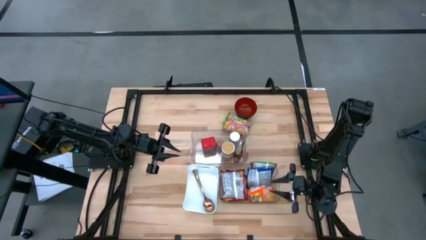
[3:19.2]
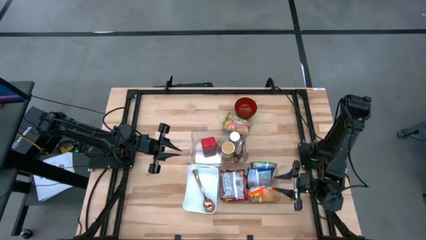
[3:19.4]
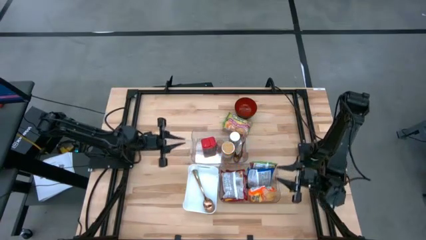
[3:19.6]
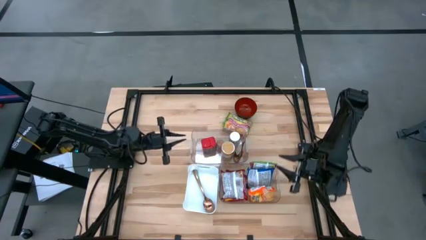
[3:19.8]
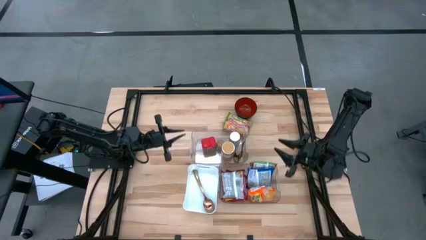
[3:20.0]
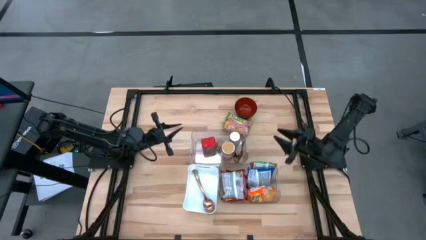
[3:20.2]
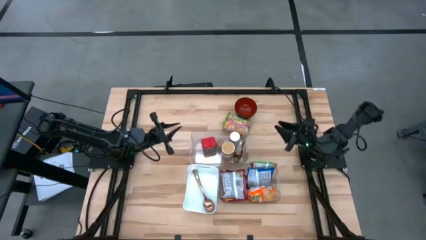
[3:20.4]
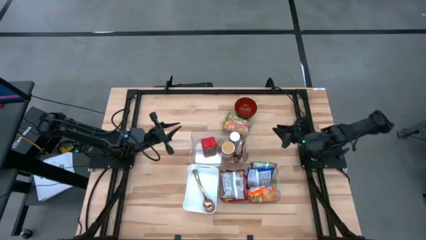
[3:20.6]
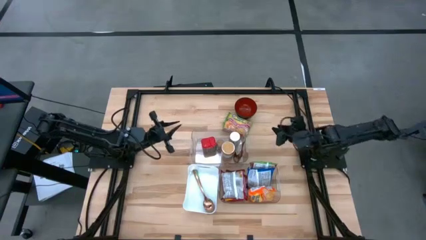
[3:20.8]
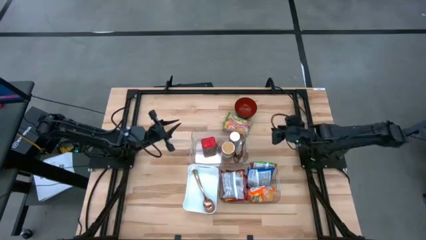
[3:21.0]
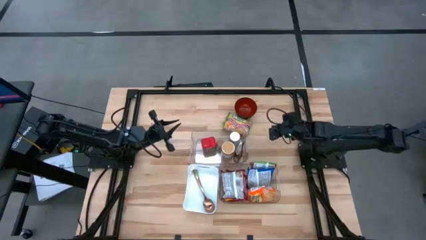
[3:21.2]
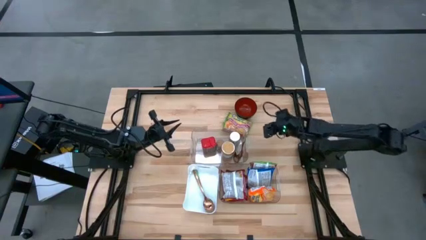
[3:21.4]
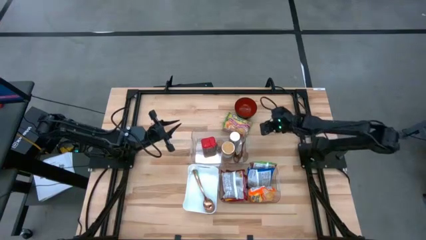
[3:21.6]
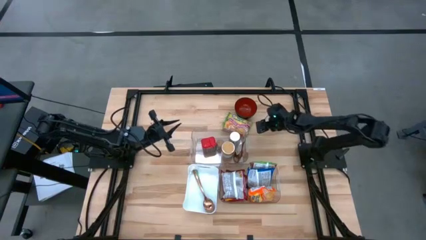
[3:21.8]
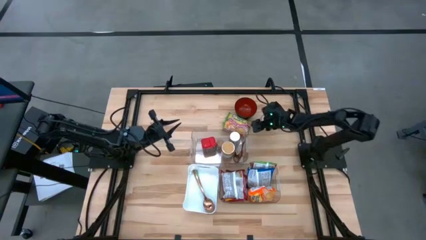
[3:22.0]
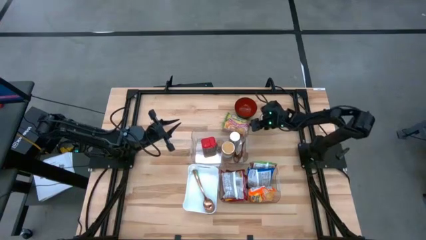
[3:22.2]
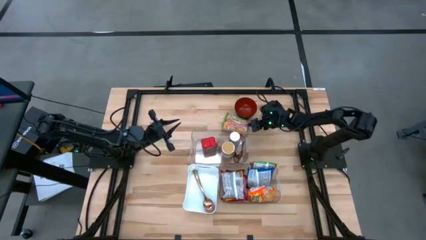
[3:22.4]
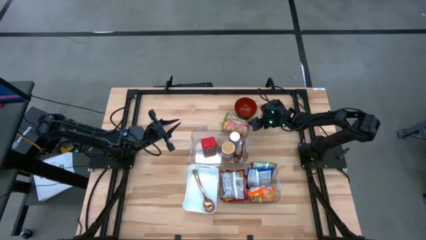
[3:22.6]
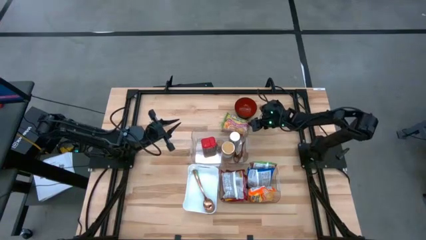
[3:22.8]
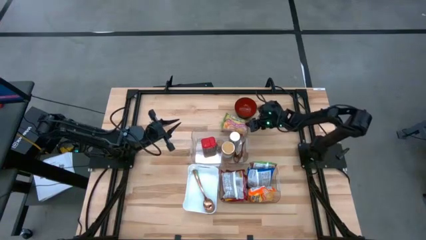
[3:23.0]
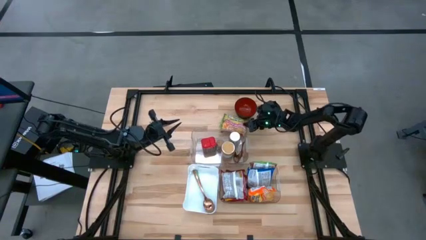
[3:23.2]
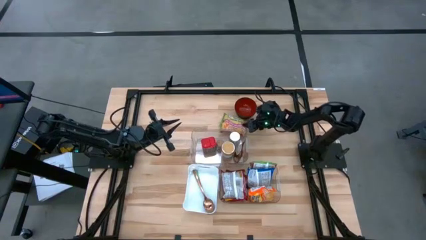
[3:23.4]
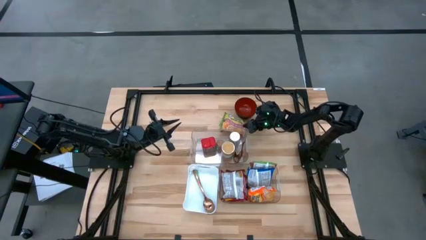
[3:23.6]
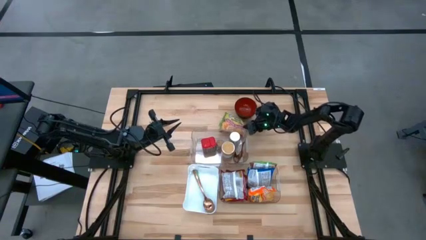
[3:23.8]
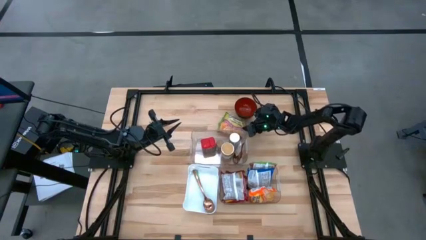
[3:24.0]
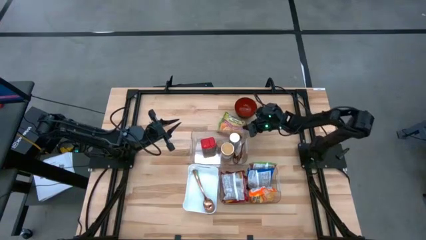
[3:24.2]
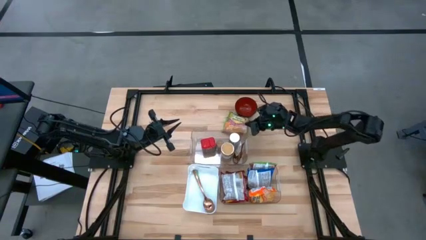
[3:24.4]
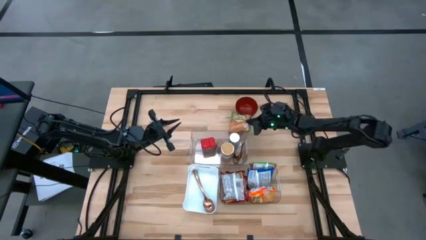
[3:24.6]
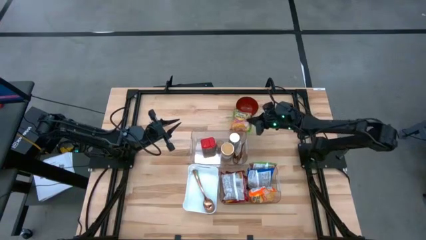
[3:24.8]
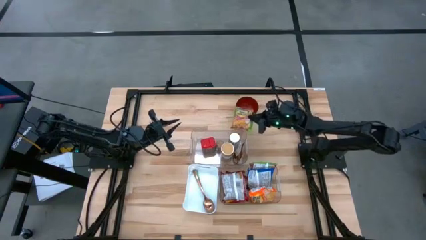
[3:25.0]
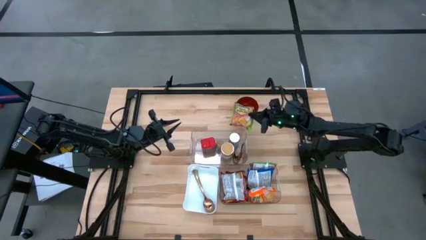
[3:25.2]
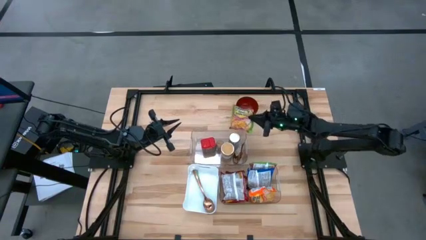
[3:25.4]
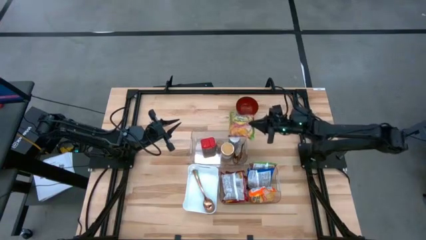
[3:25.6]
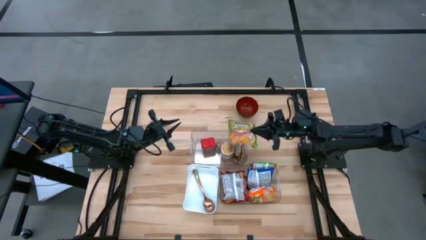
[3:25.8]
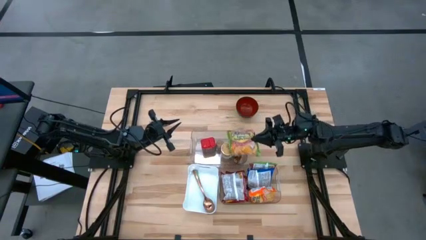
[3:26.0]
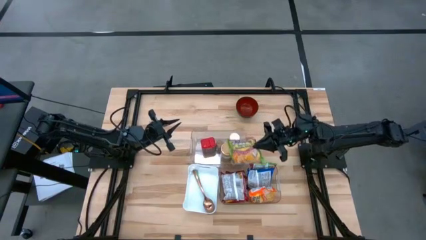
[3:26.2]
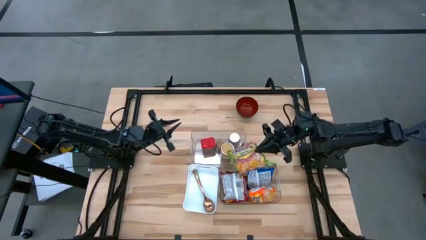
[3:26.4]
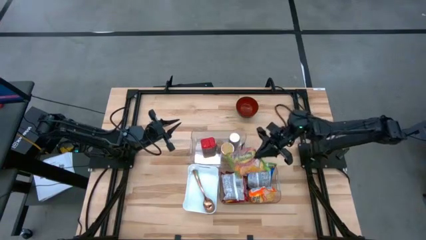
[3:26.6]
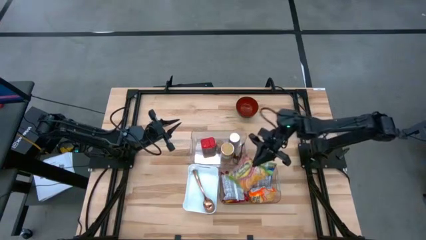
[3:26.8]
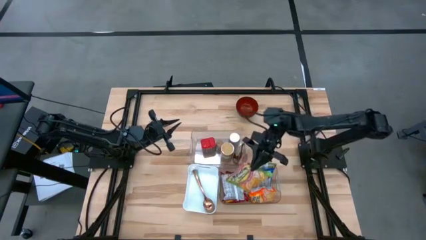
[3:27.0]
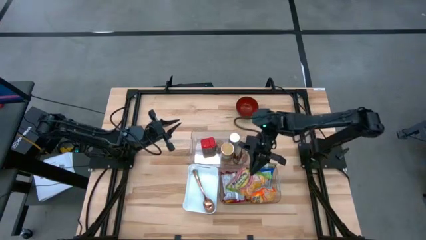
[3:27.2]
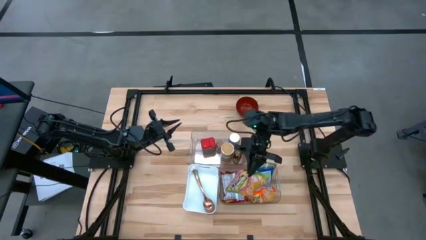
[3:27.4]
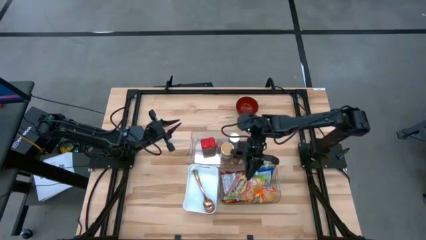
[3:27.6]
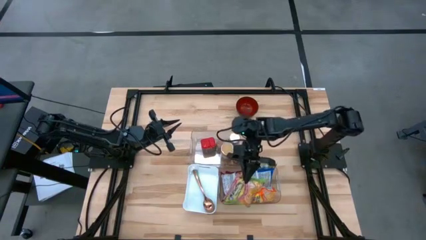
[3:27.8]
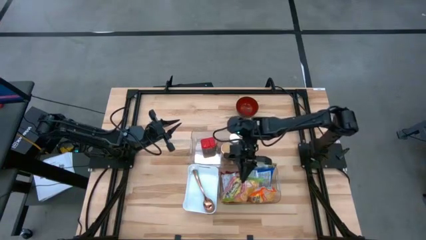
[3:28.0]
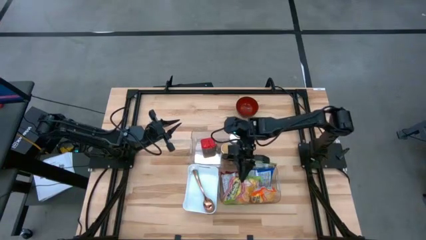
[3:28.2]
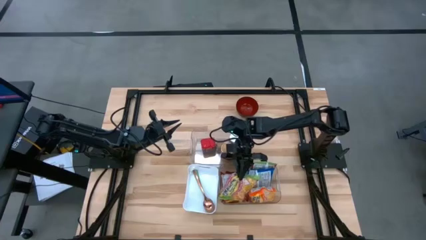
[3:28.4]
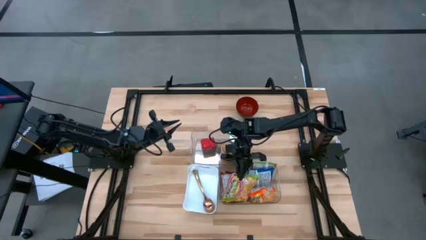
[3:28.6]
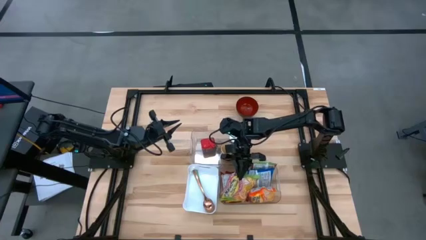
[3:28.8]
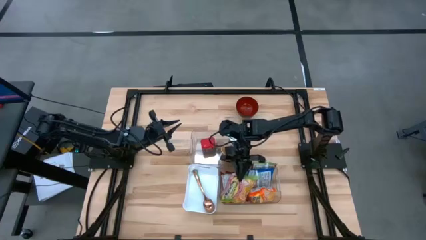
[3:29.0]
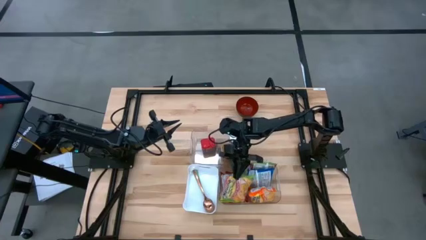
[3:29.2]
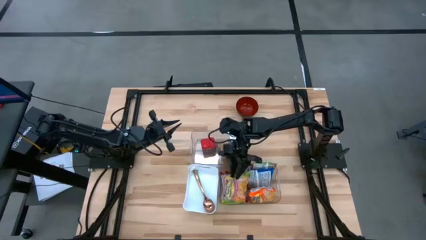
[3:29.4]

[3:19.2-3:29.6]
Task: Pick & Place Food Item
Put the green noodle pack into the bottom transparent bin

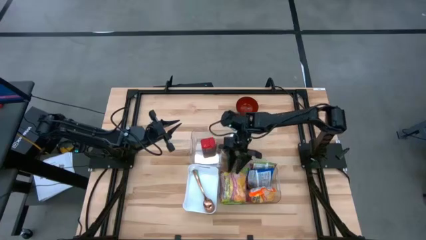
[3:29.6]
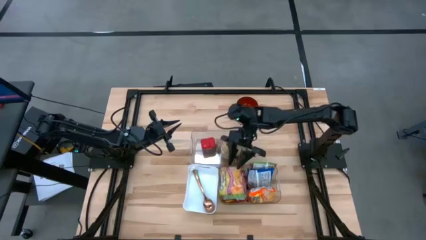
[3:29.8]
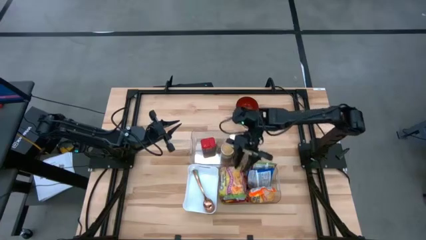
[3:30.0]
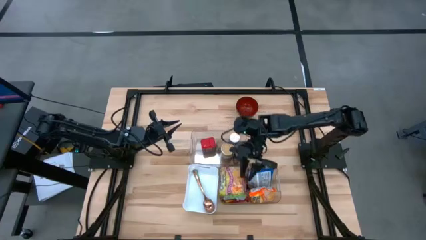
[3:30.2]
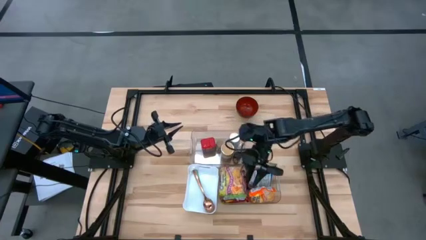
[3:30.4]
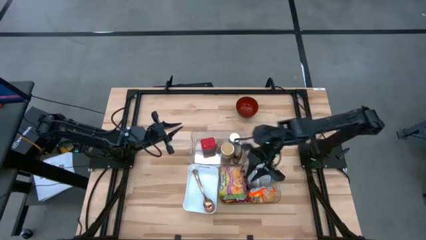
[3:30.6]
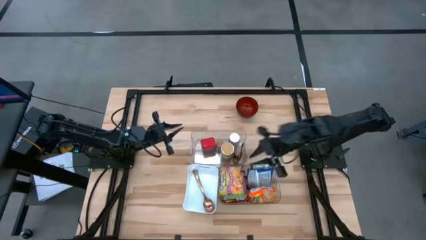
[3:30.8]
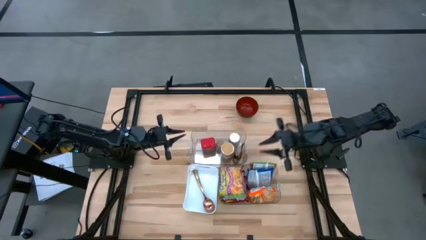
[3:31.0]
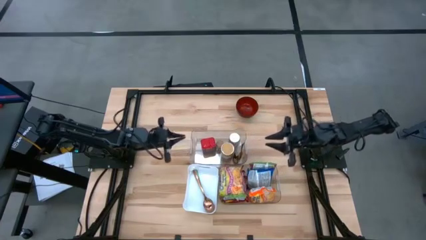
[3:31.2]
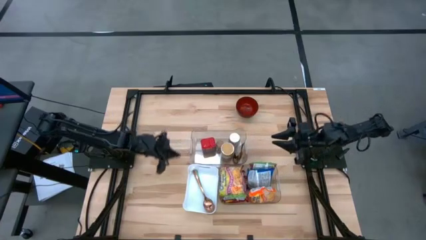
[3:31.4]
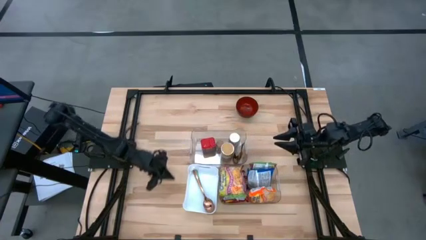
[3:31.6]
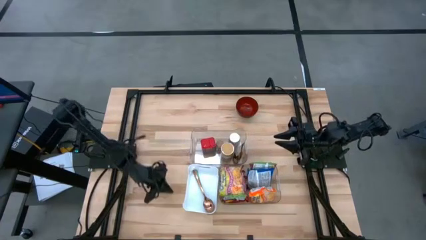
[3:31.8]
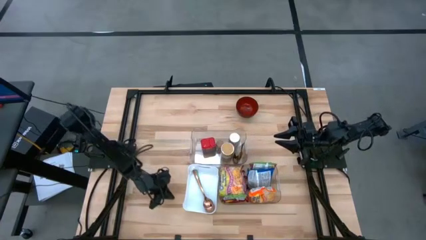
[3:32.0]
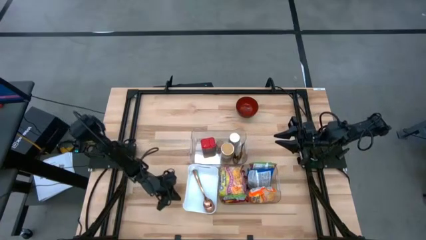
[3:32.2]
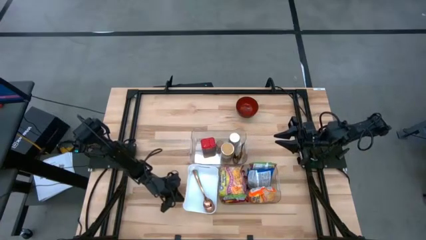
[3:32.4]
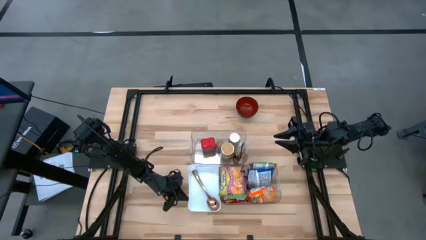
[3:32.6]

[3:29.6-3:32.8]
Adjust the white bin
